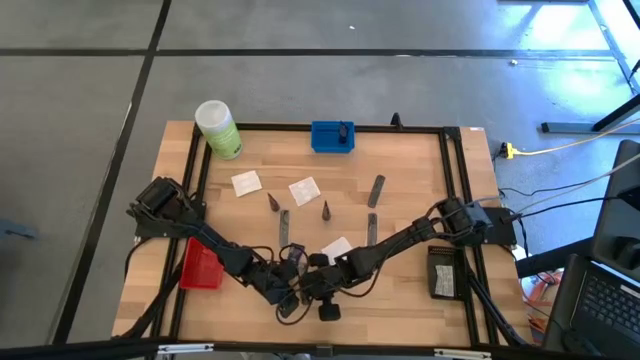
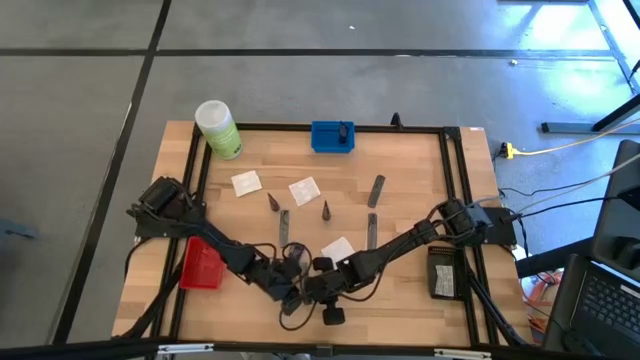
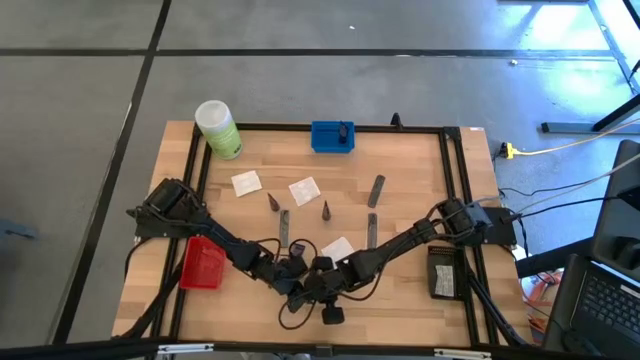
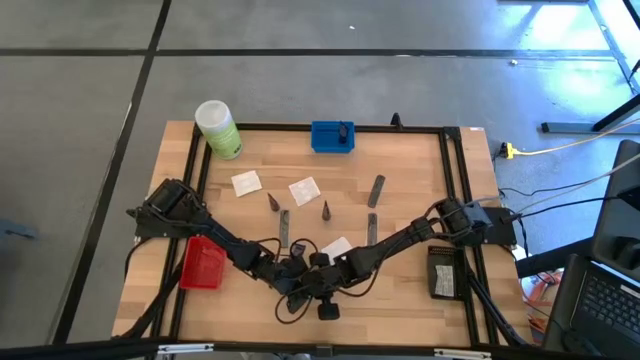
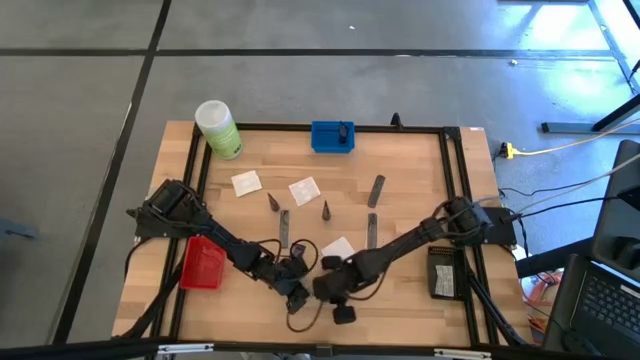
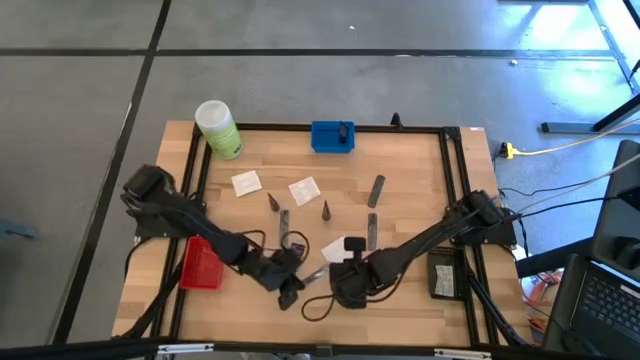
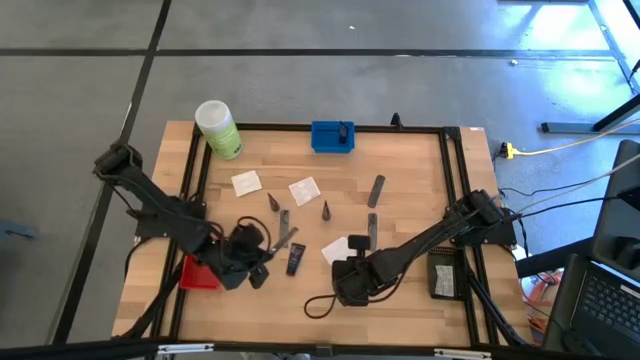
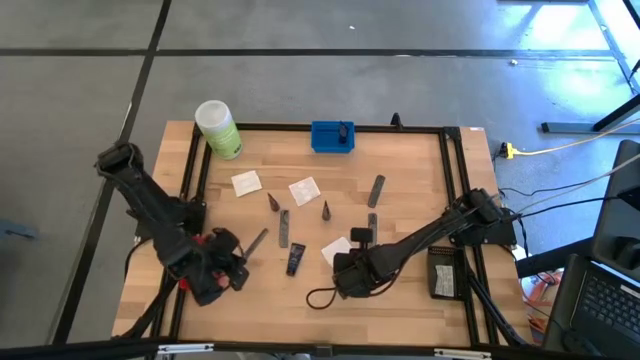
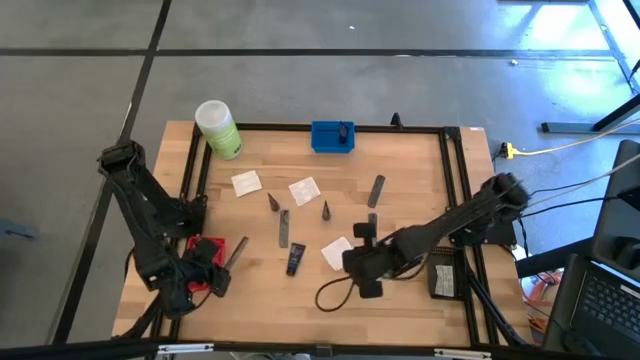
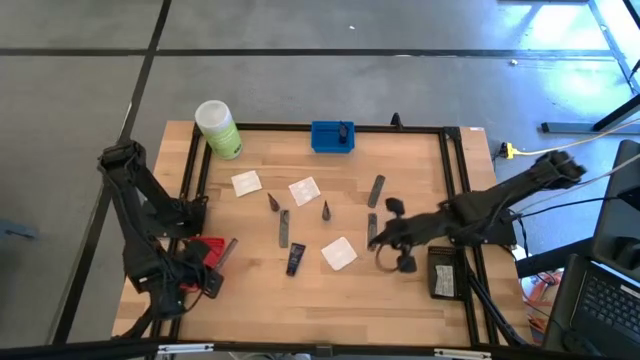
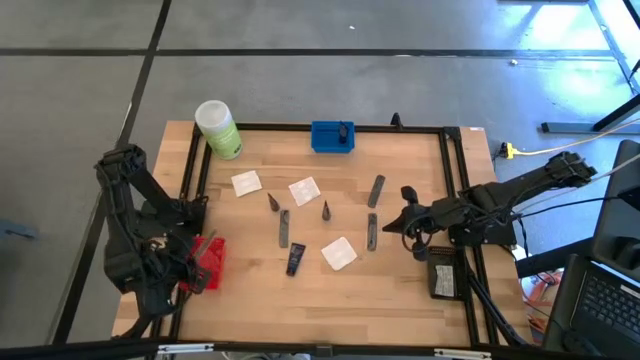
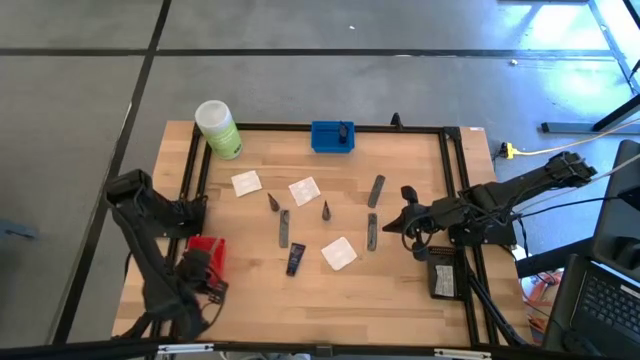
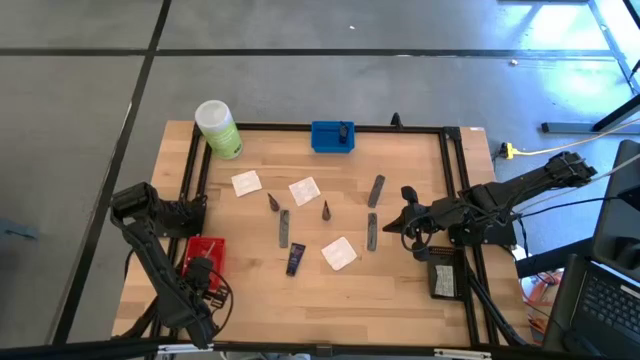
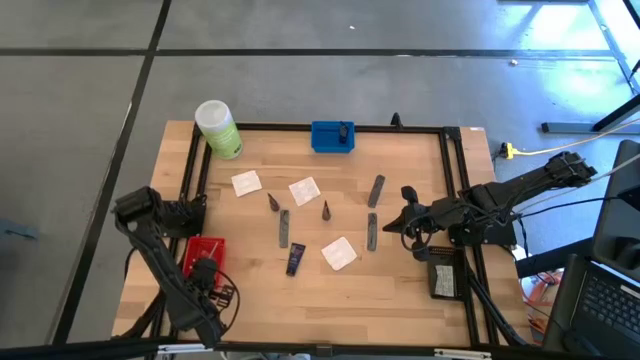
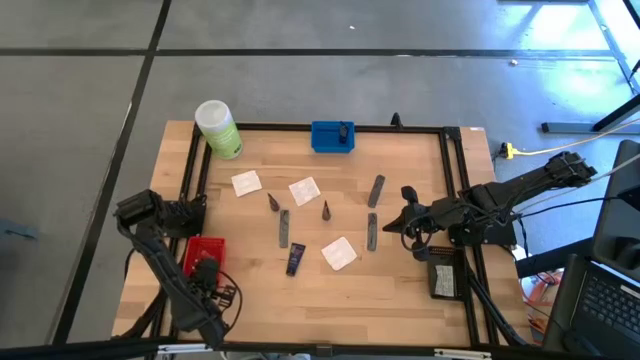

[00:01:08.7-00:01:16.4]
Task: Pick & Place Travel size toiletries
Put the black hair comb into the red basket

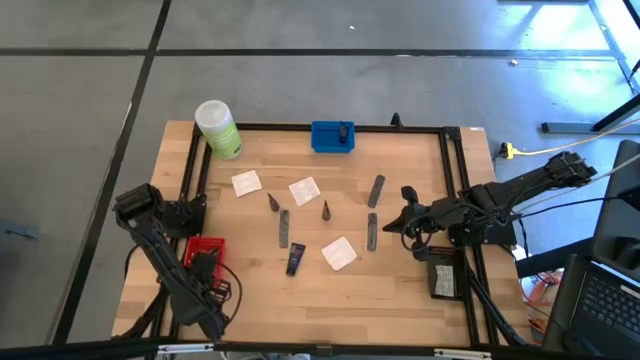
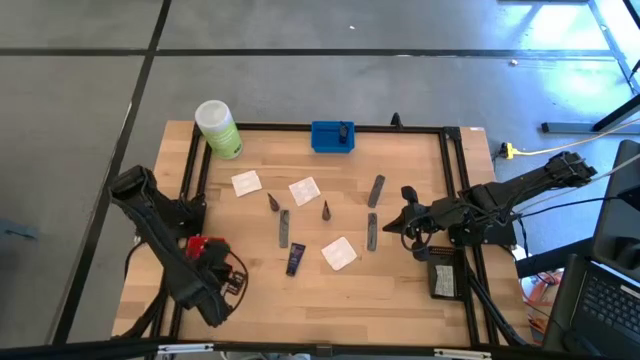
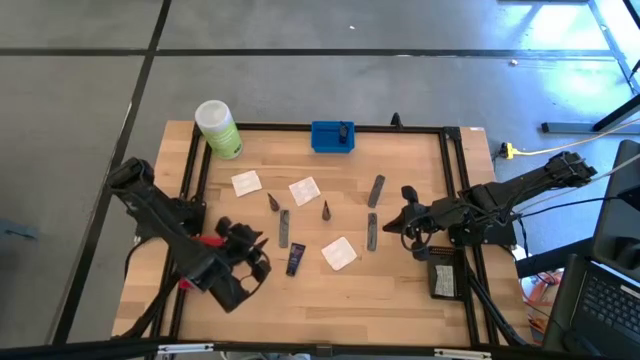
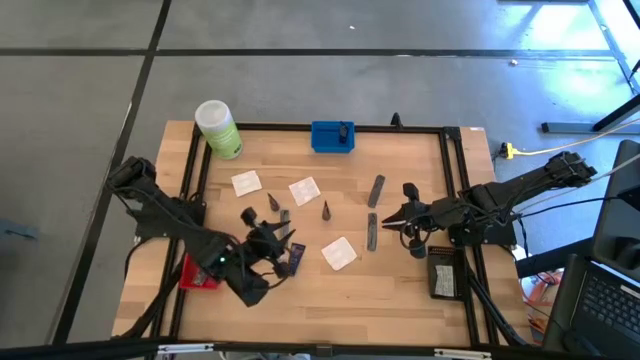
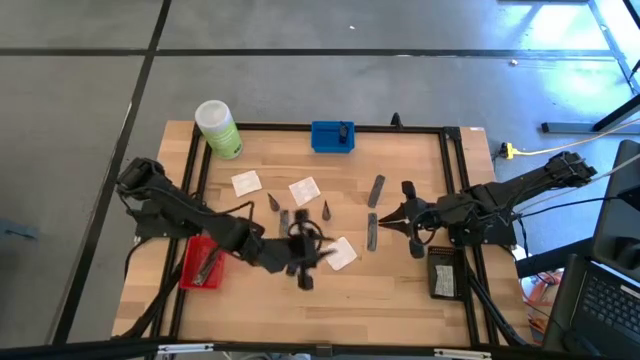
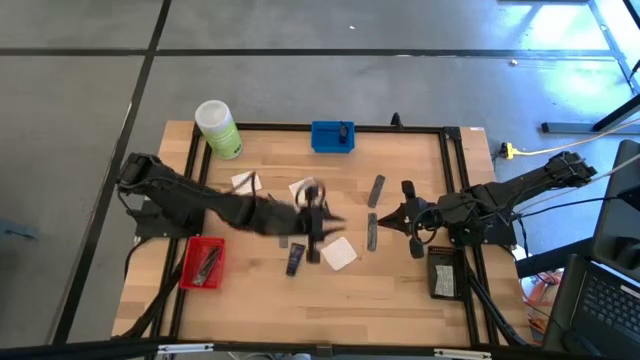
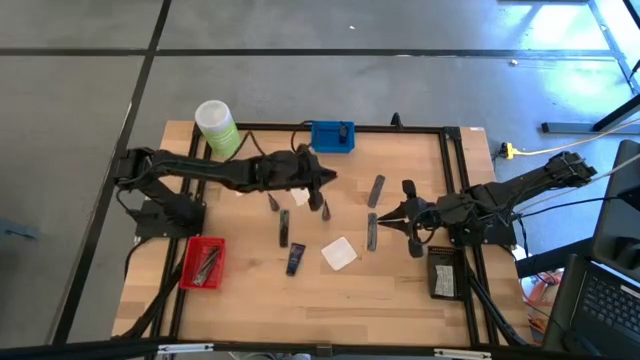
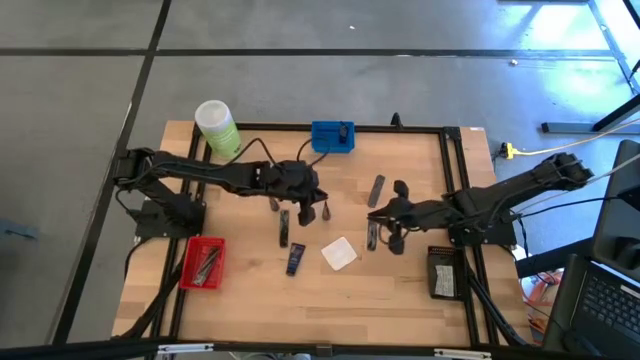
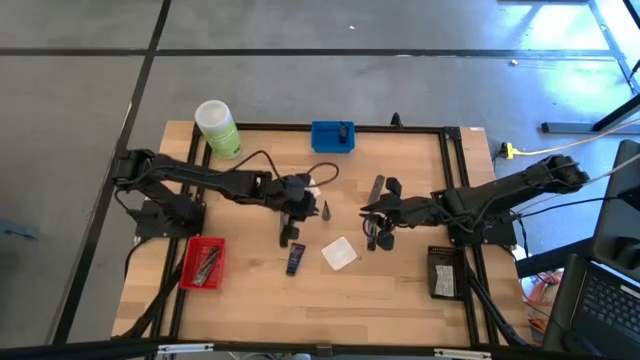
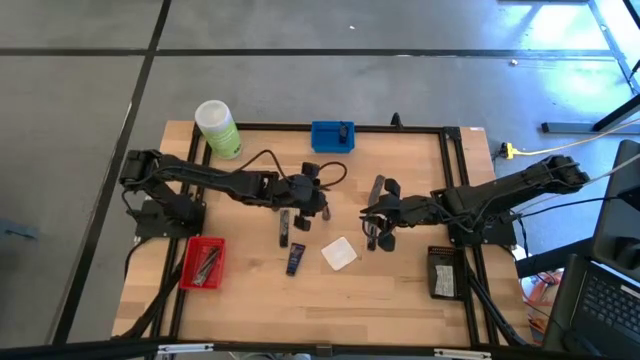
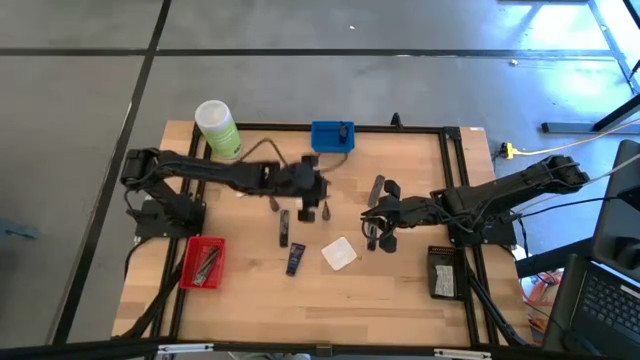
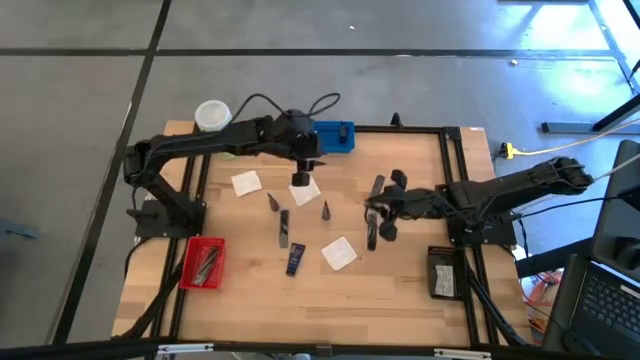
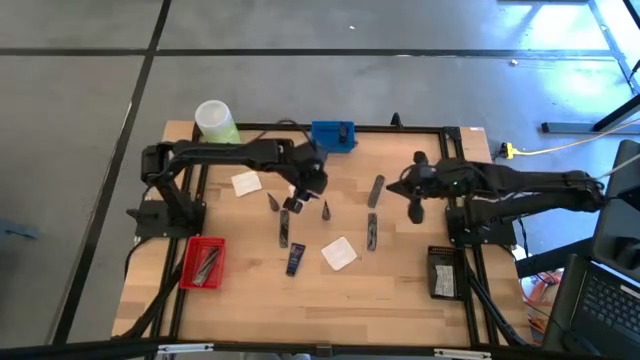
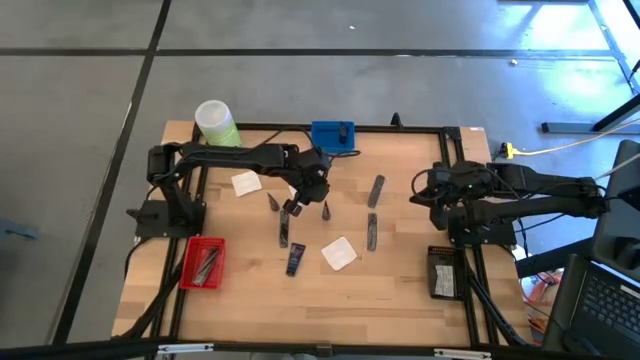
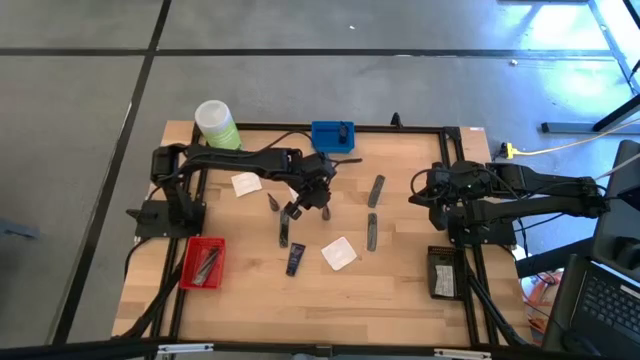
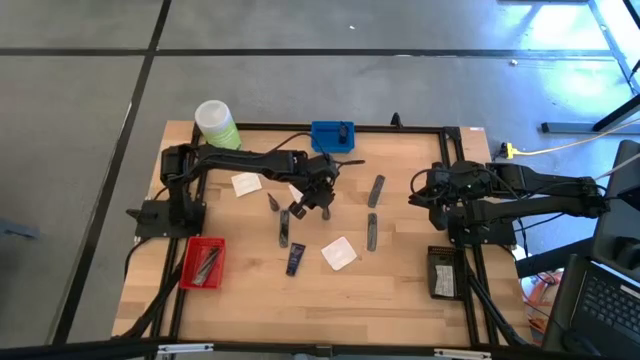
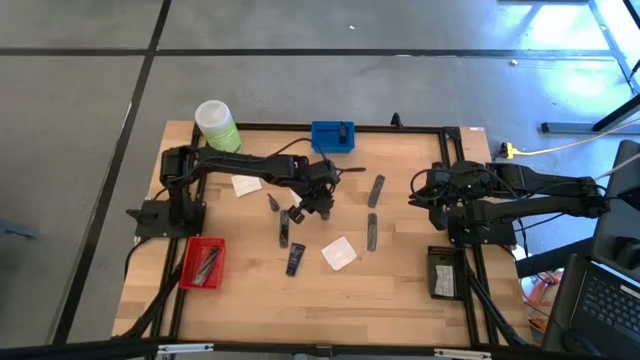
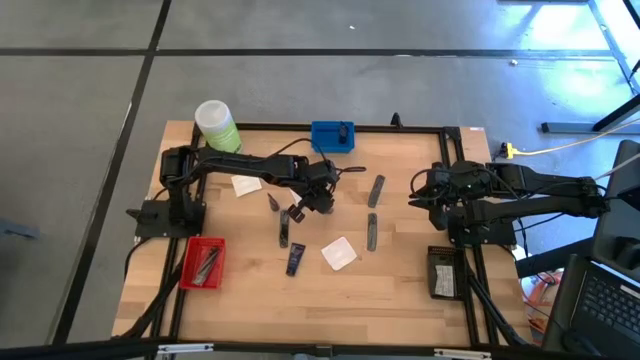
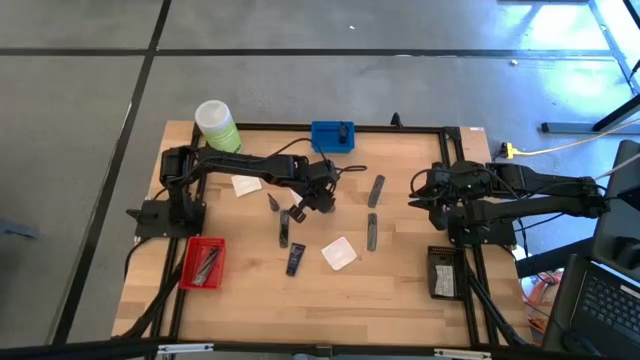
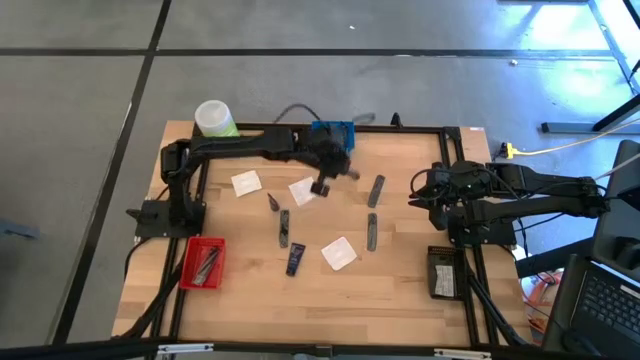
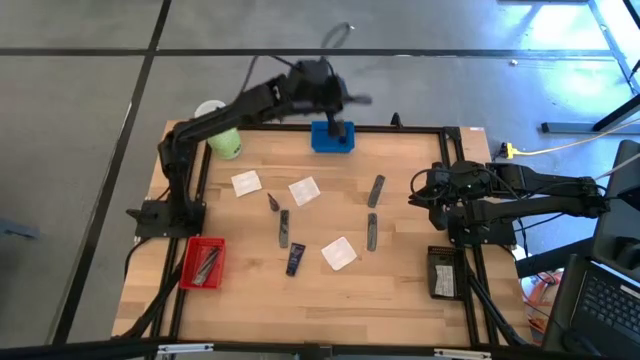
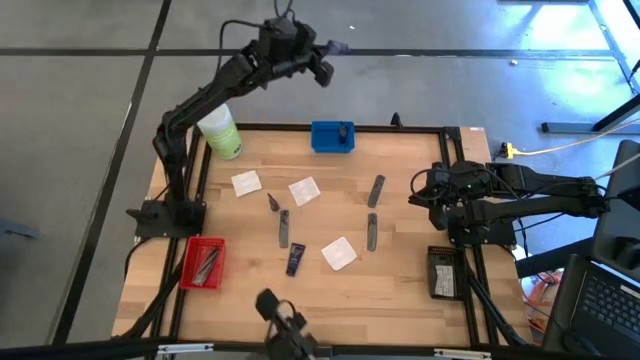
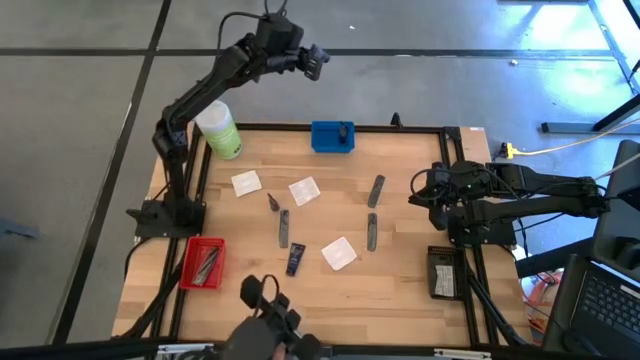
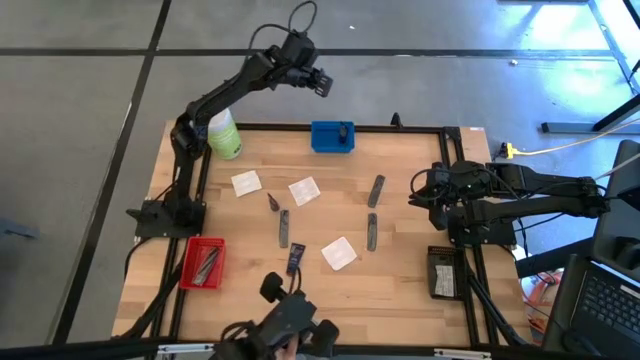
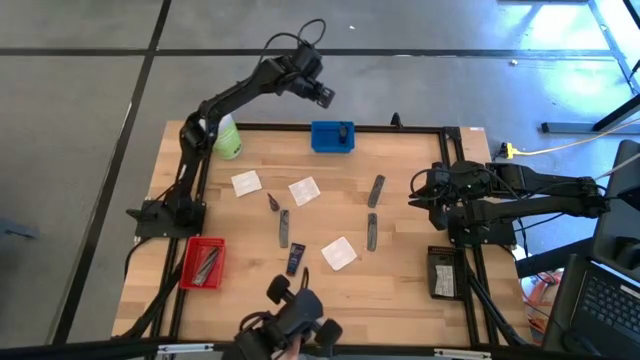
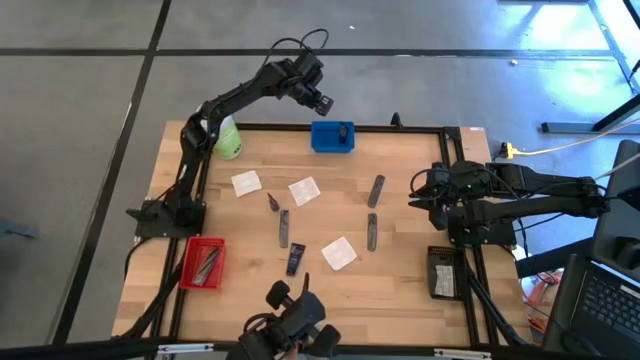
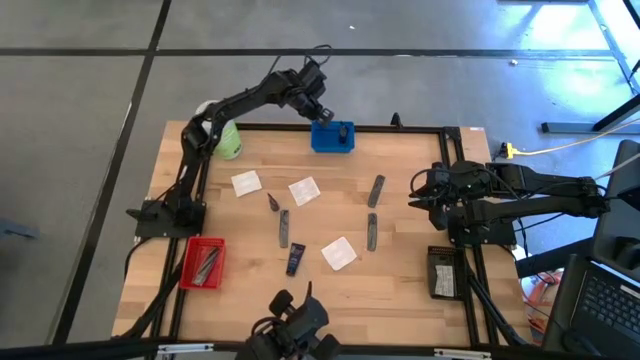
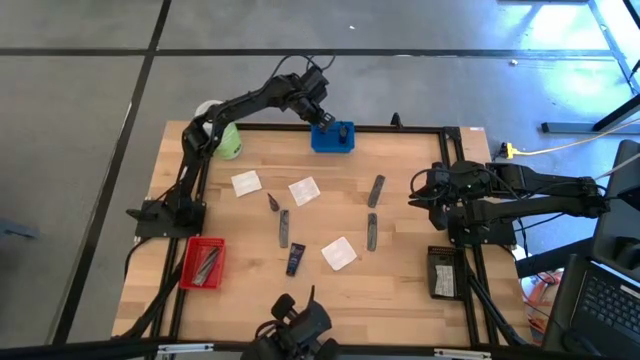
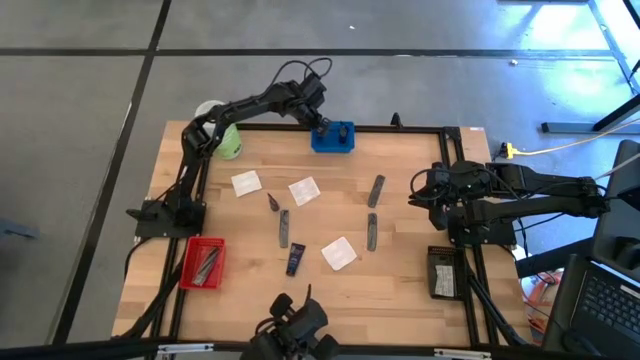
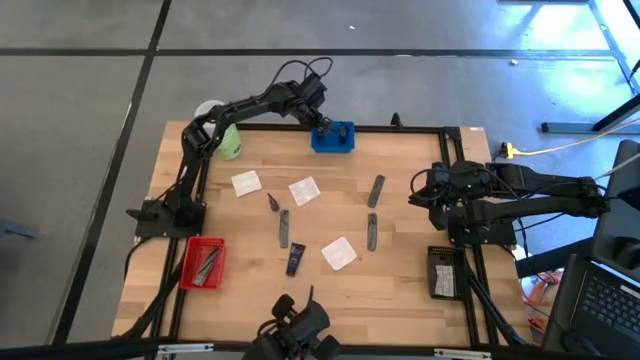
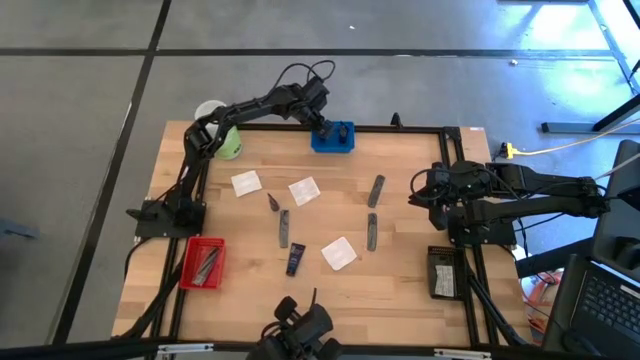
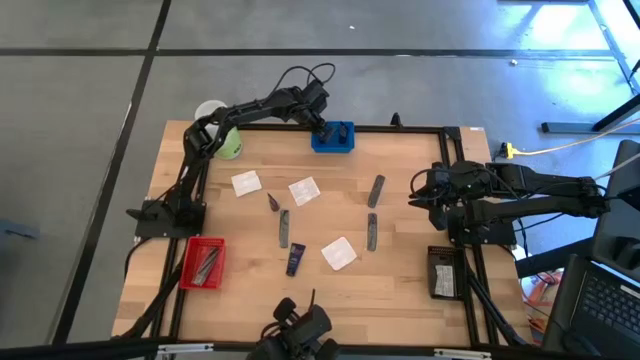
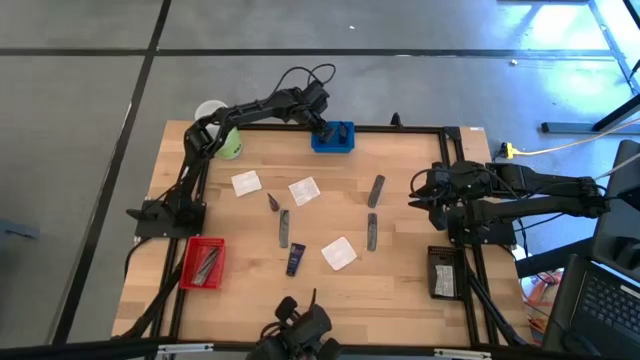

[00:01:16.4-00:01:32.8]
Put the dark blue shaving cream bottle into the blue basket
